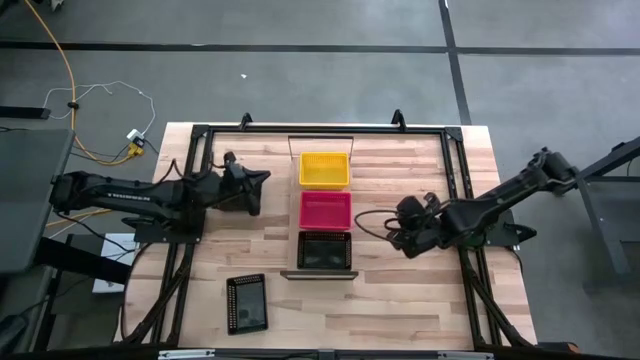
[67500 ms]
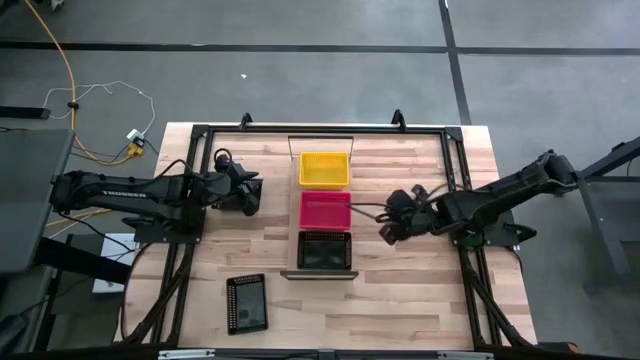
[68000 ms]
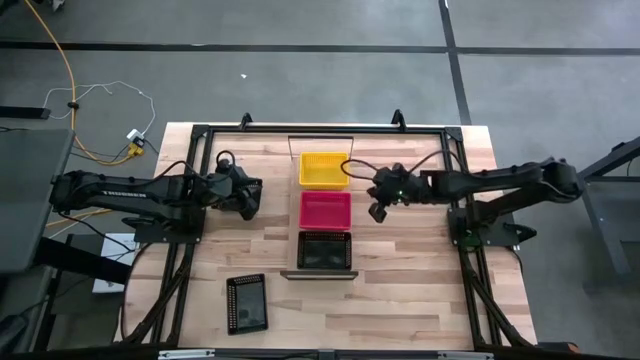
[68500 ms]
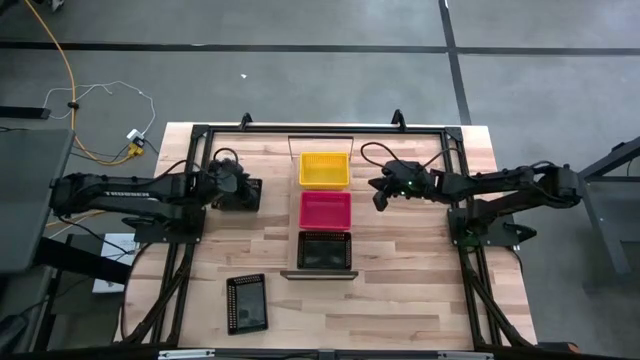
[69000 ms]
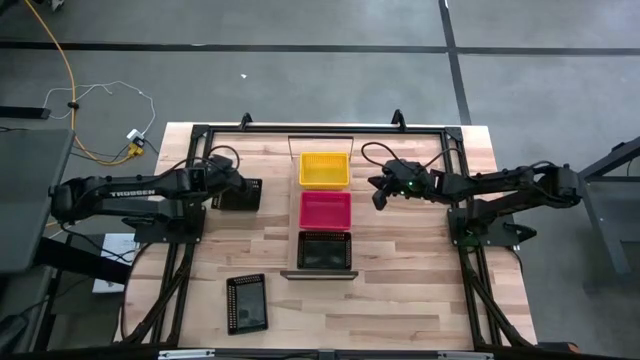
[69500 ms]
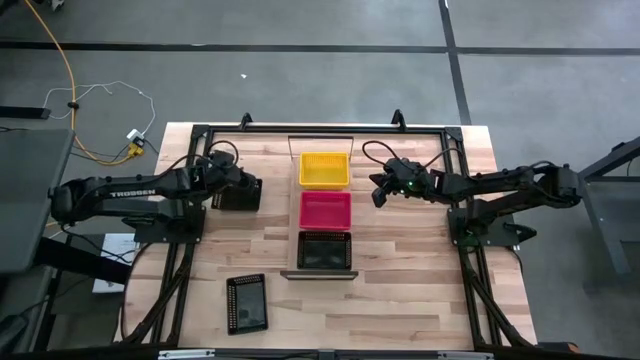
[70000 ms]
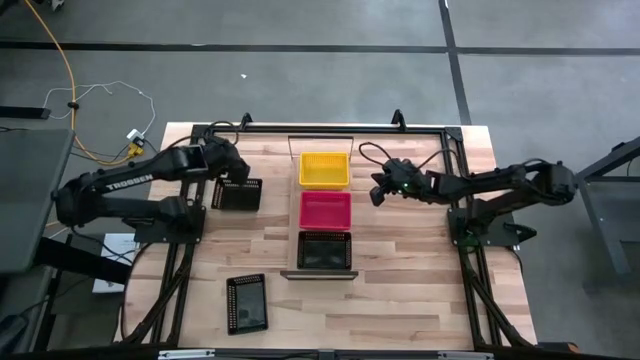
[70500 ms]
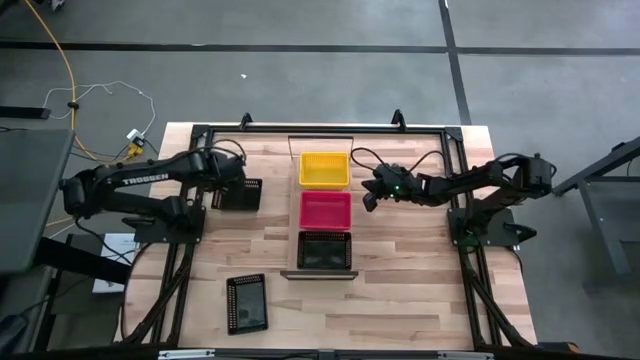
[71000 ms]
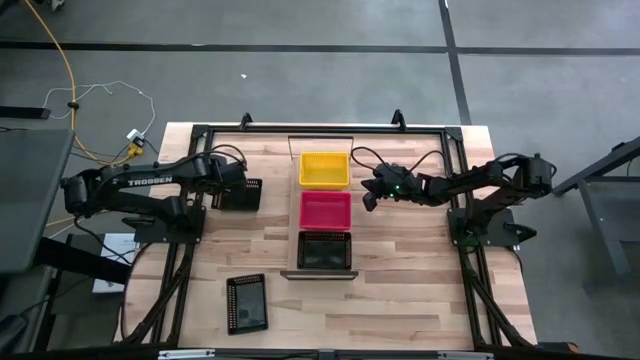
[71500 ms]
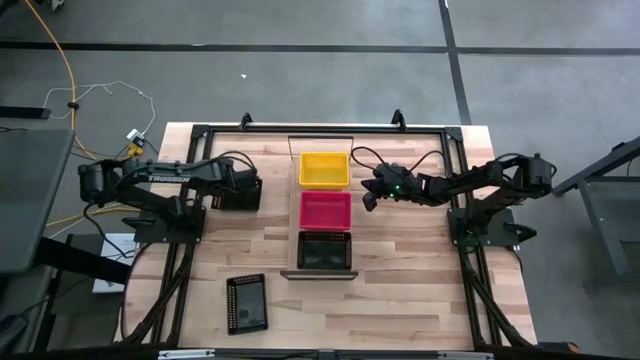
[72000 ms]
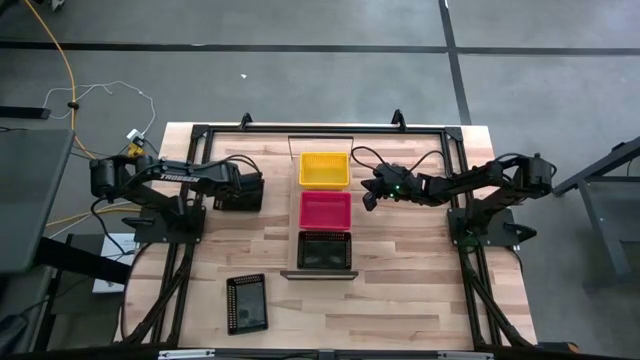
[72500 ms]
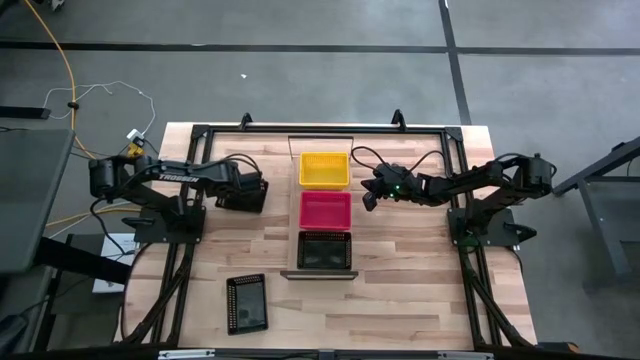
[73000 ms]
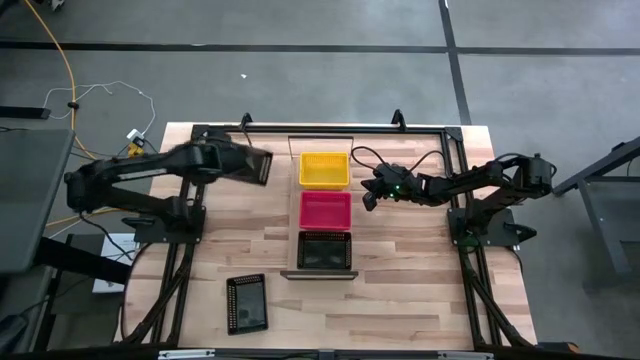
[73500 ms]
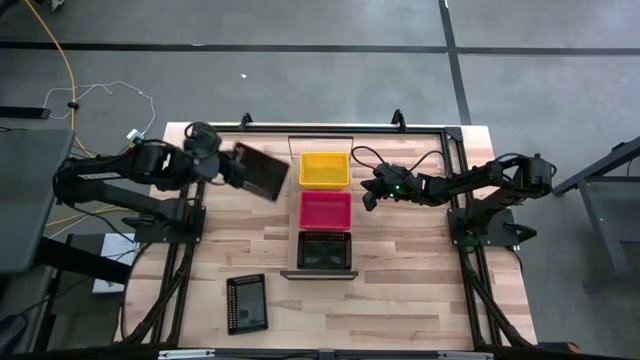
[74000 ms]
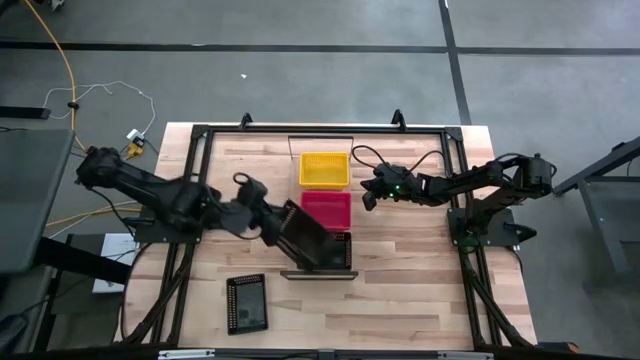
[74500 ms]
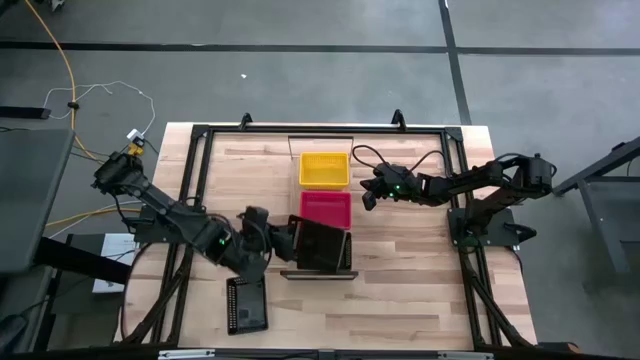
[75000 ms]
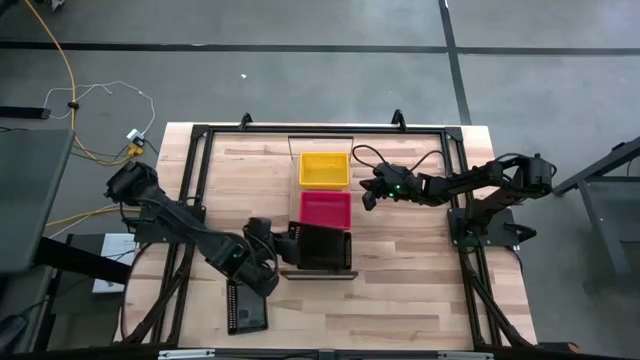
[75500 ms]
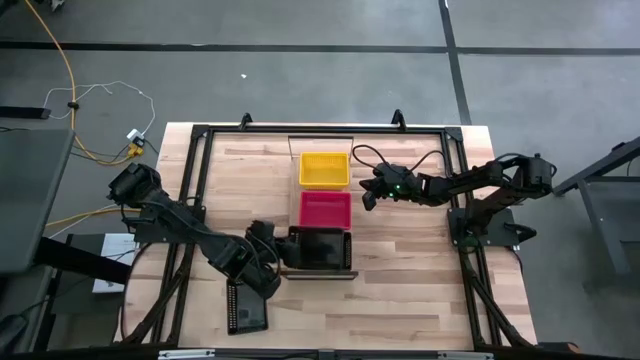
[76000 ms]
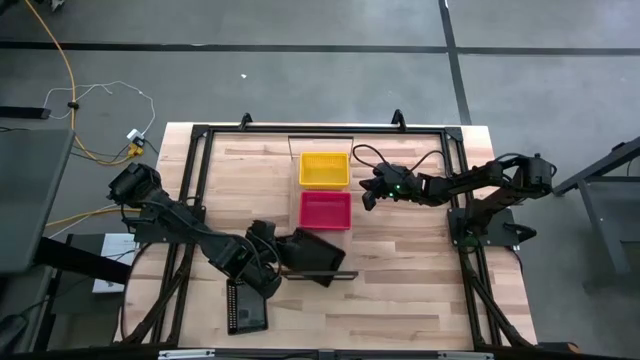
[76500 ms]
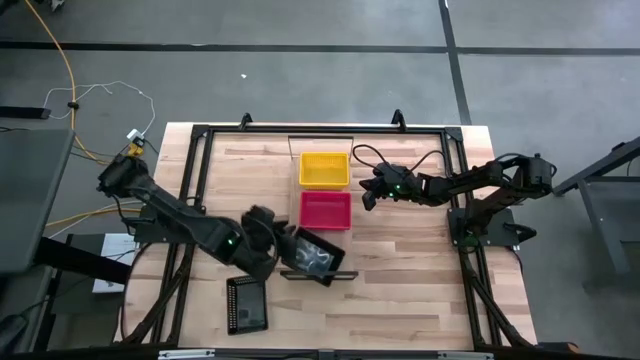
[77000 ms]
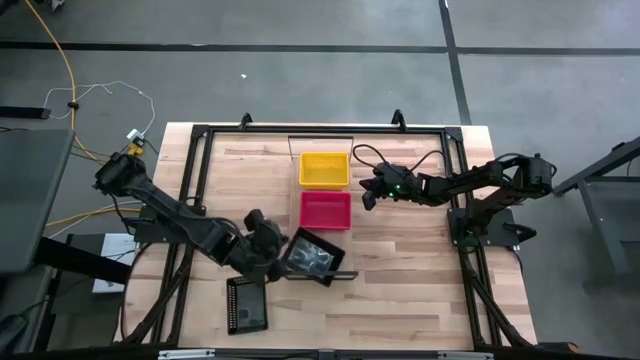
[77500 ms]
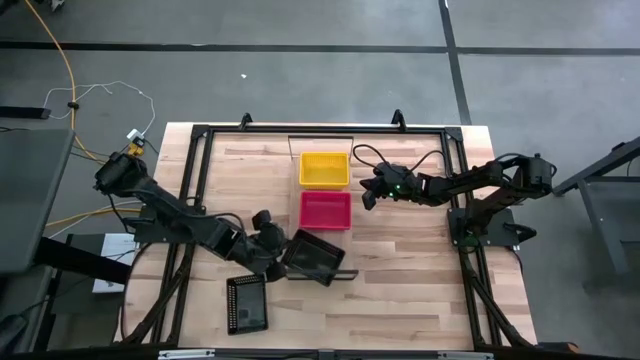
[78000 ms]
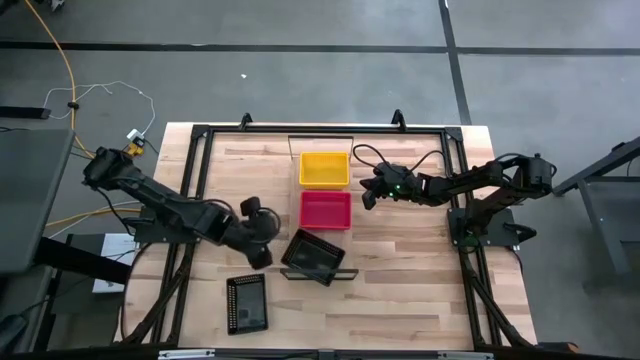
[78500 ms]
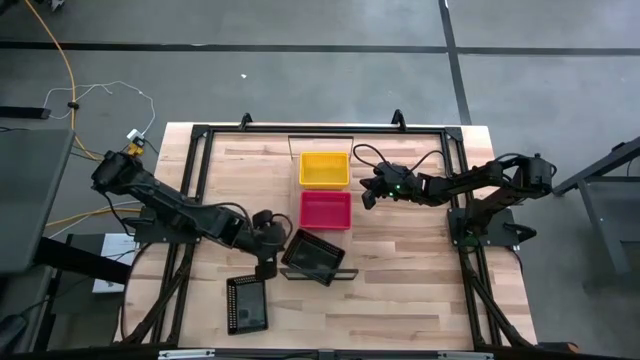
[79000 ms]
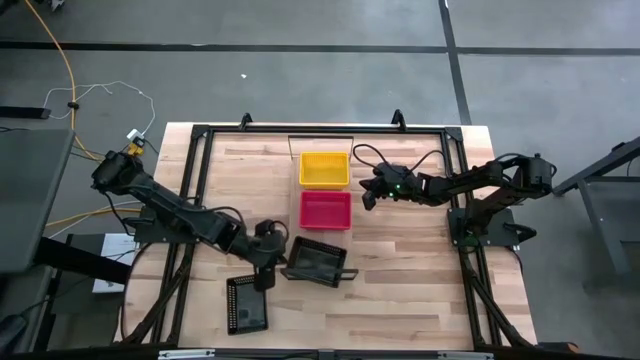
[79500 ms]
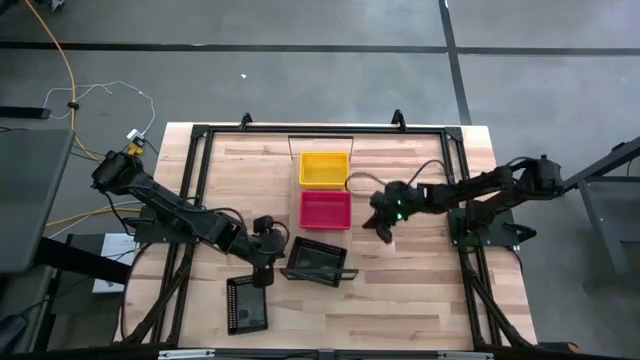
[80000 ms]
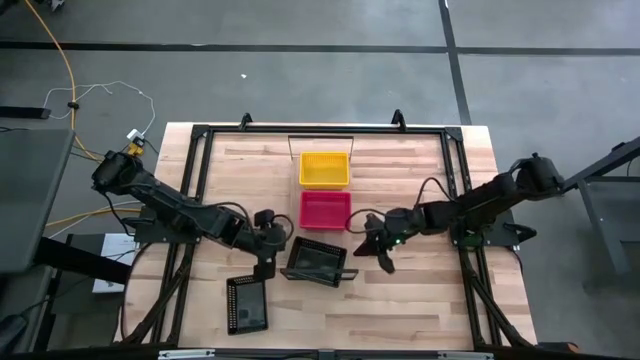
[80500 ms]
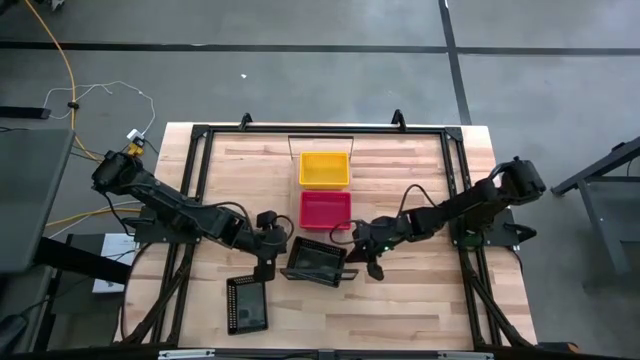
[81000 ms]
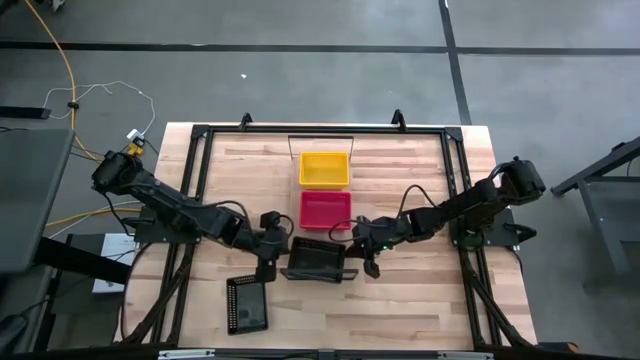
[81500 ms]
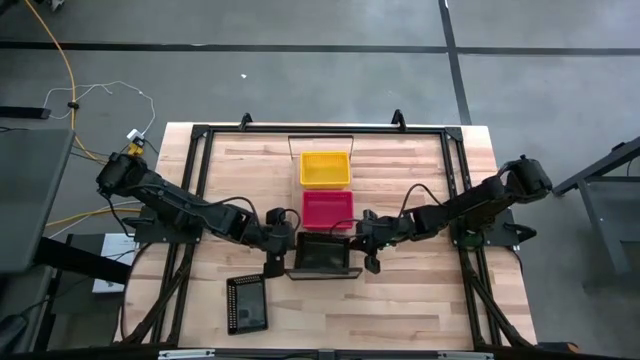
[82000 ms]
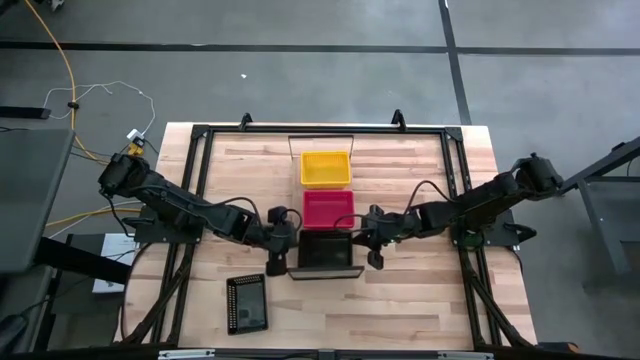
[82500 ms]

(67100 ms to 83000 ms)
Task: Stack baskets on shelf by color
Stack the top black bin on the black bin on the shelf

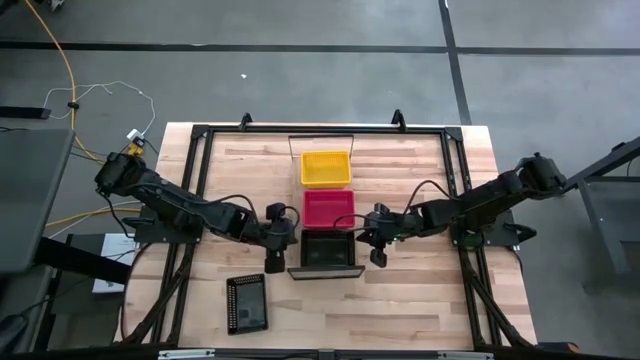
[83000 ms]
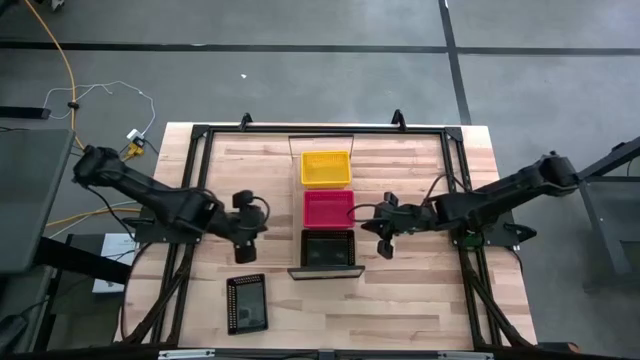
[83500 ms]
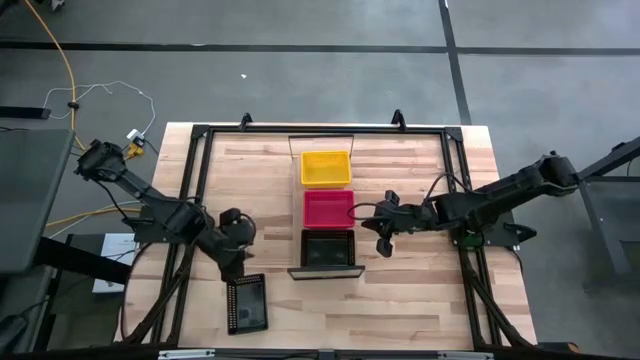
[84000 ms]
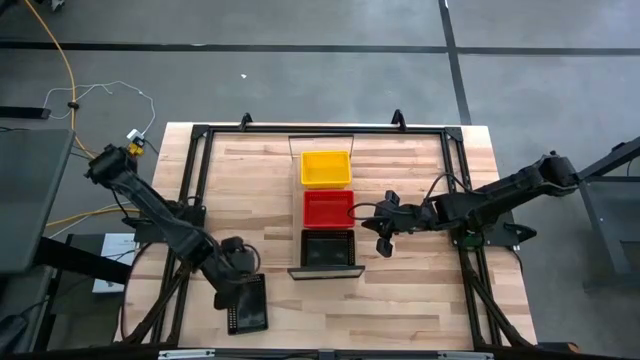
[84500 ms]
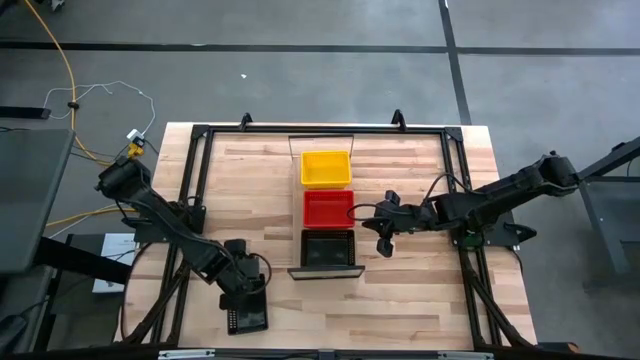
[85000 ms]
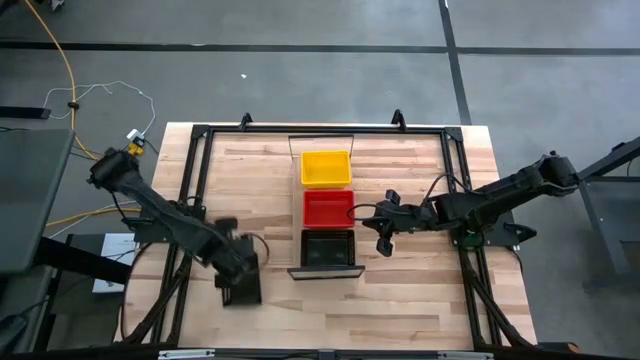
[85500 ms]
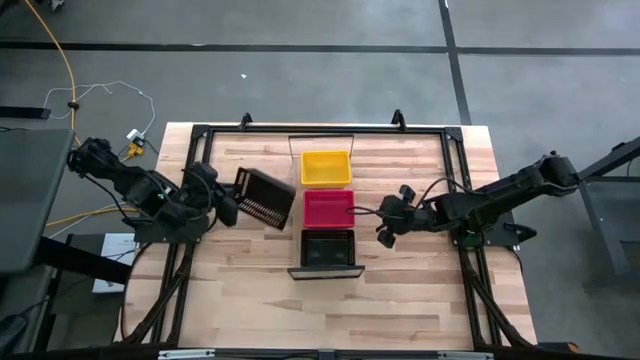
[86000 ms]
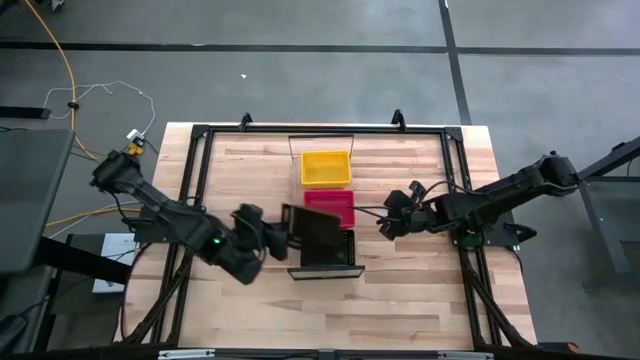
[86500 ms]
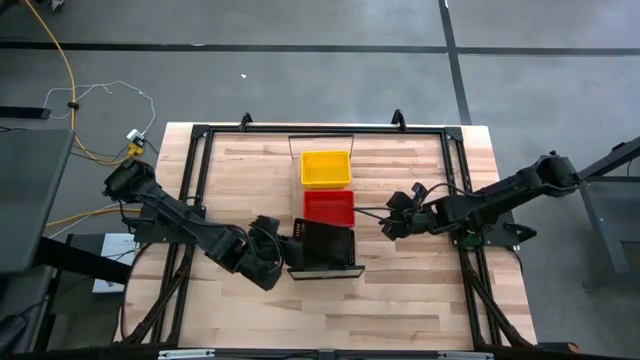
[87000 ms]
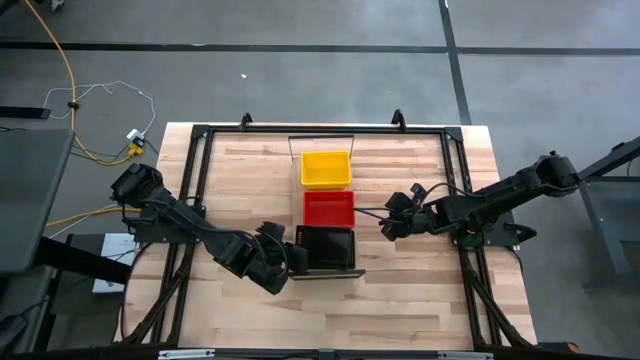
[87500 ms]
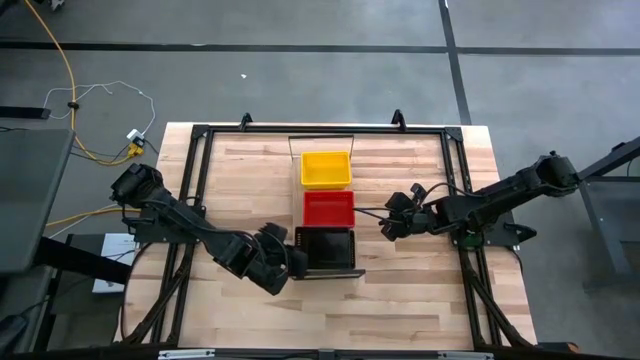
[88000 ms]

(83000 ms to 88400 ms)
Stack the black bin on the black bin on the shelf
